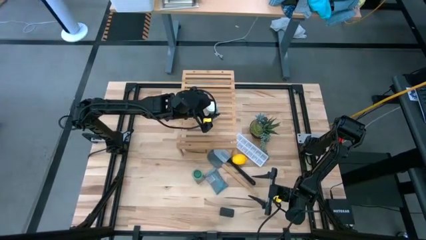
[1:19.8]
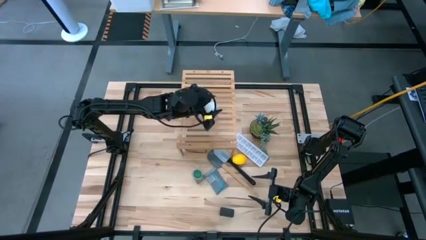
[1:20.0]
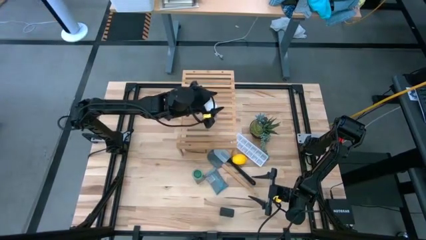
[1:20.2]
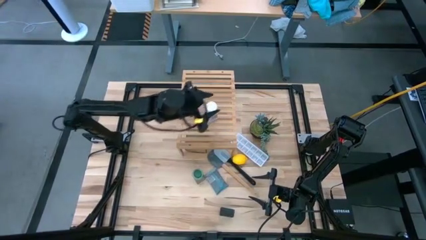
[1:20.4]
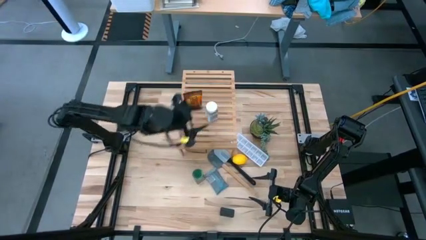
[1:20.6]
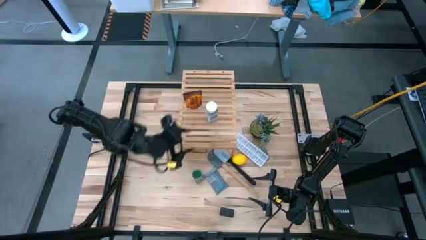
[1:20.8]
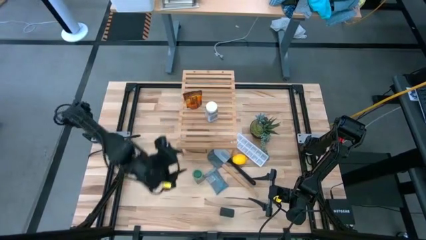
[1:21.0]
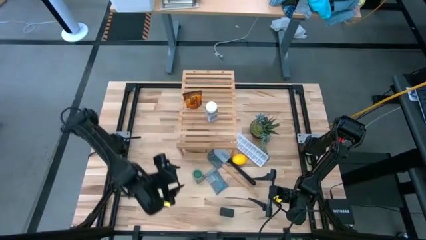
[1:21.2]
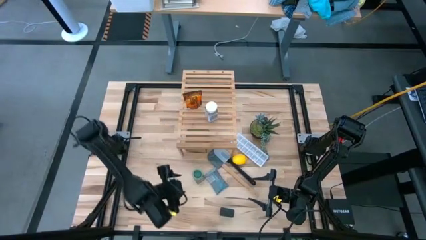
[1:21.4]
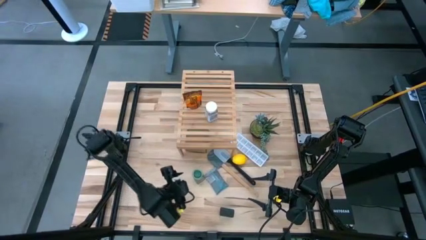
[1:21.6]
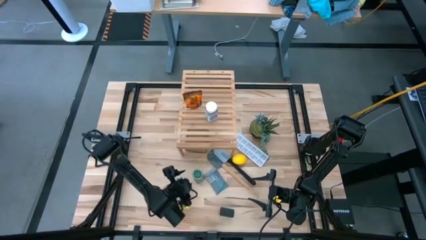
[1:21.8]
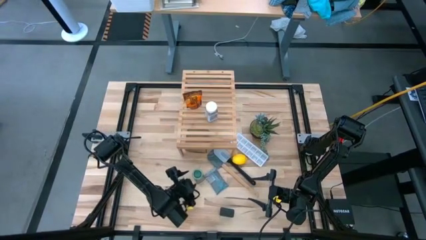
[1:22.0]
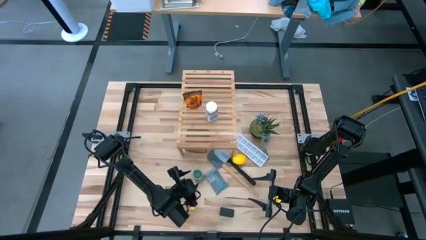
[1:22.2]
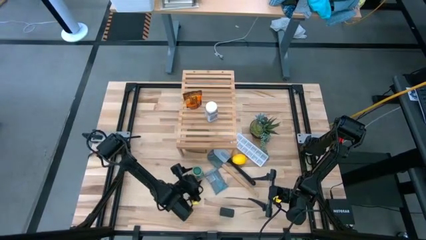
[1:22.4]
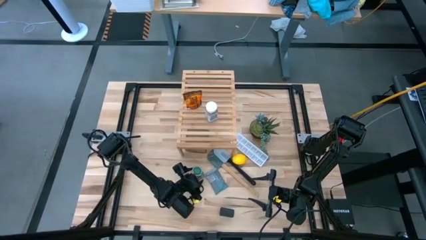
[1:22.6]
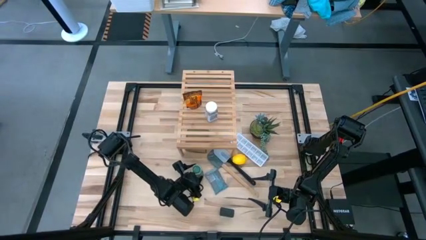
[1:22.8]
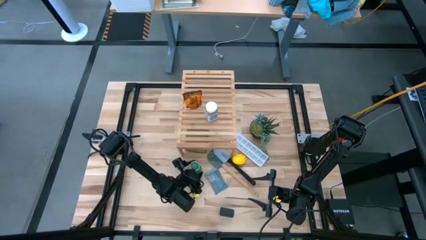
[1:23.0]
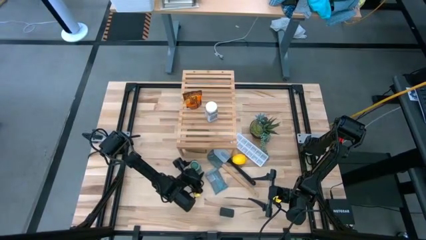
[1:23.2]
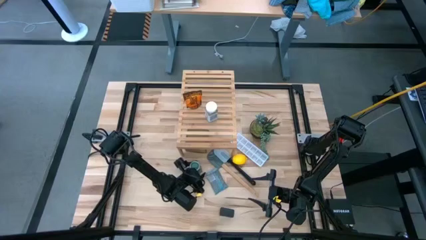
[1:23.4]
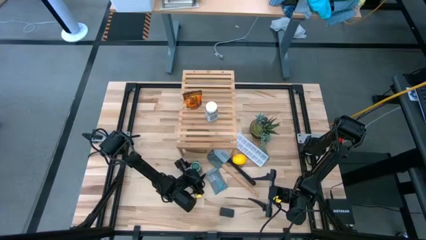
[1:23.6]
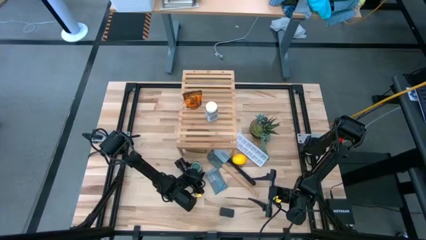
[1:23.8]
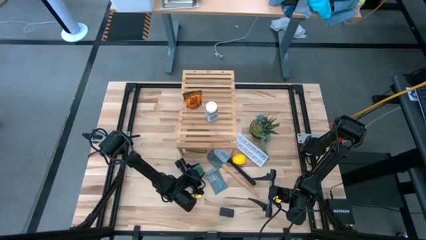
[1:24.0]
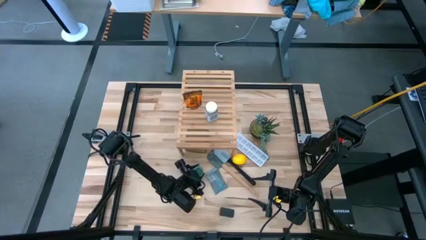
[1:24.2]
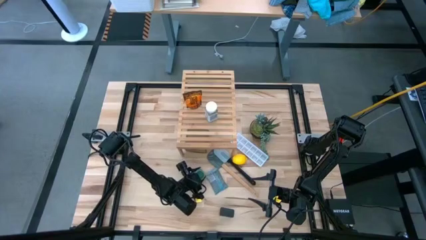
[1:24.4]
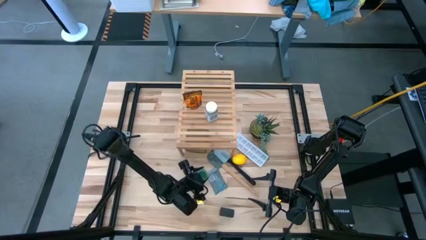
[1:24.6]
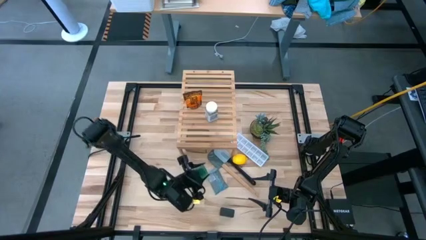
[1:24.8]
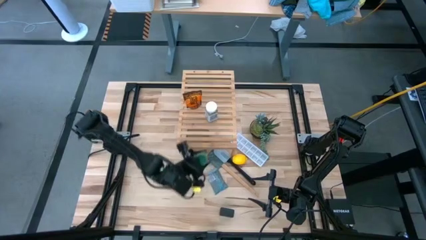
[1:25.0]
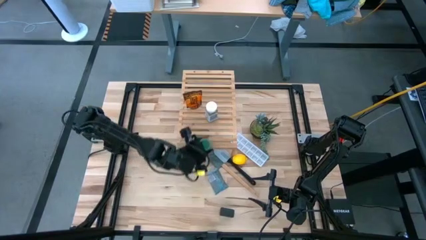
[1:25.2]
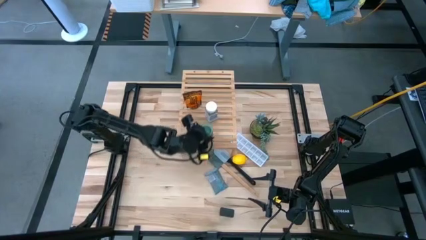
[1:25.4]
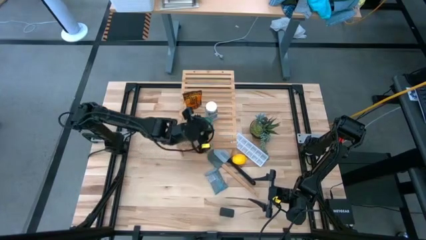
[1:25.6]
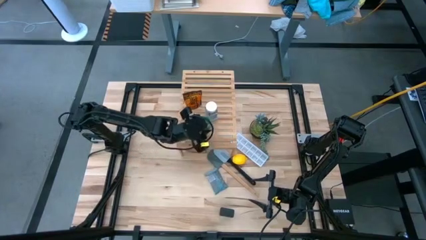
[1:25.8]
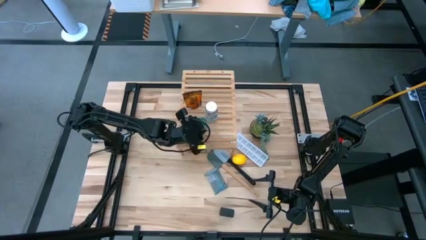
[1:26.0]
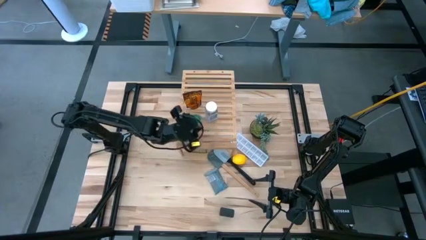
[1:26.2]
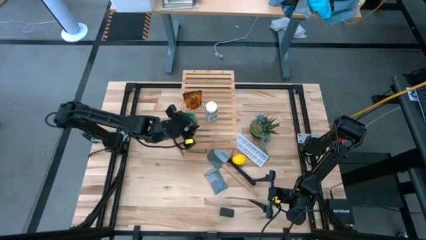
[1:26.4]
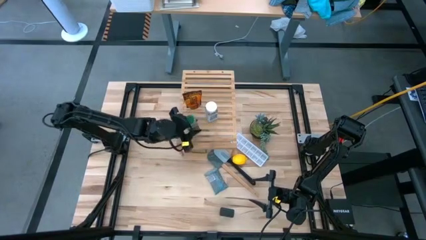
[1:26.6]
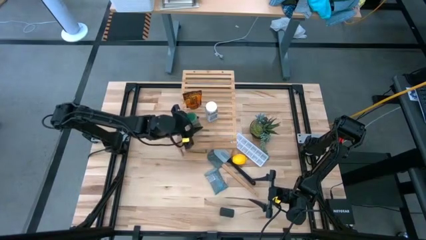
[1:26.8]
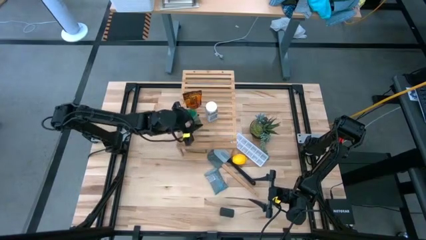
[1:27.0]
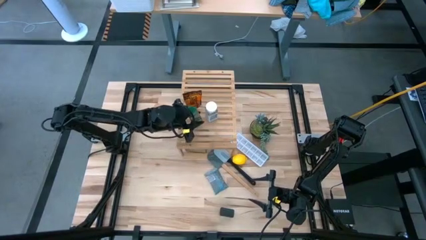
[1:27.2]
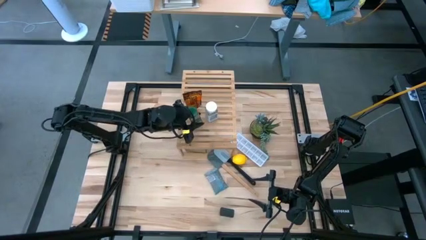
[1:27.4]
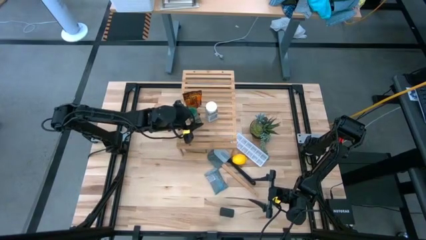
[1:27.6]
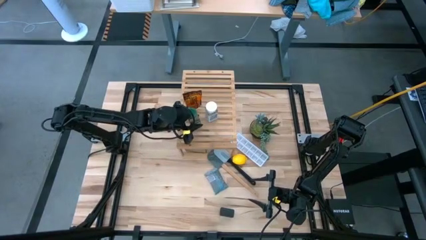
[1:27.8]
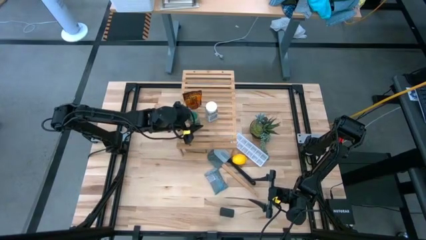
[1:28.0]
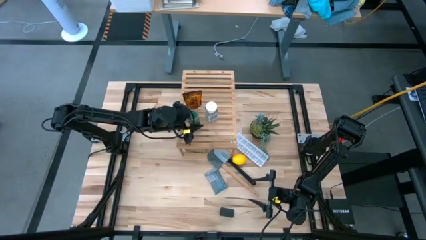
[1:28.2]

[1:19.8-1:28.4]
Task: Shelf spices
Put the green seasoning bottle on the shelf

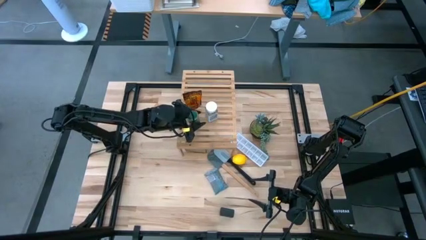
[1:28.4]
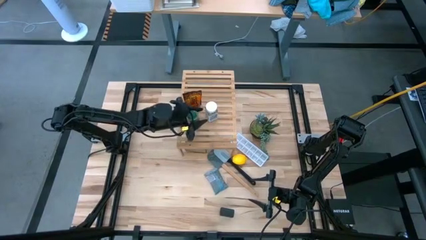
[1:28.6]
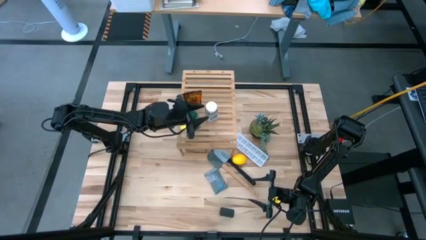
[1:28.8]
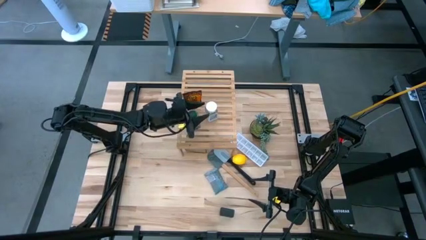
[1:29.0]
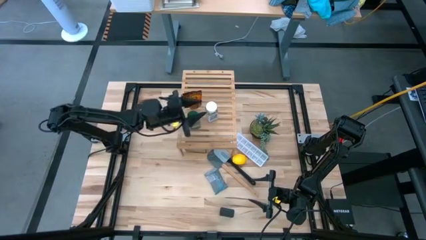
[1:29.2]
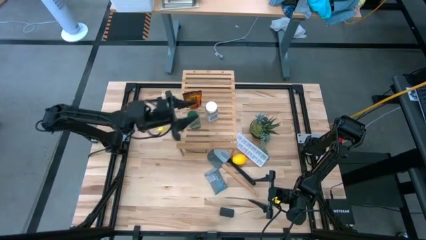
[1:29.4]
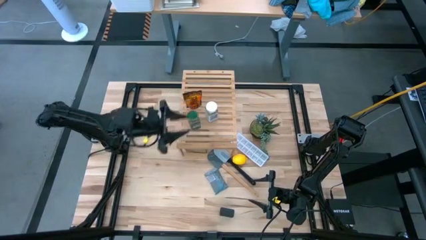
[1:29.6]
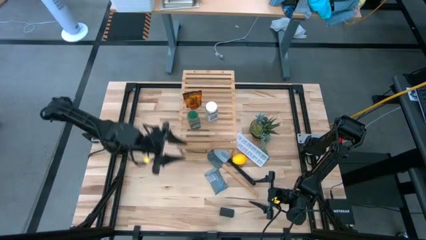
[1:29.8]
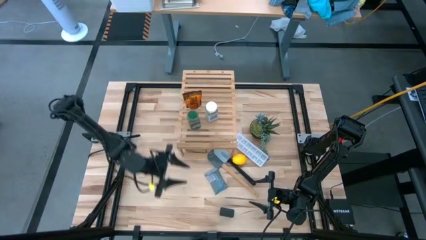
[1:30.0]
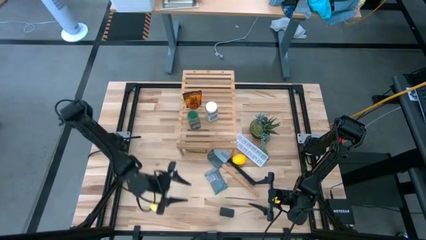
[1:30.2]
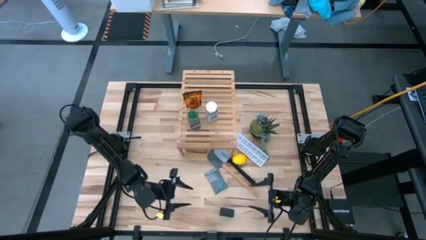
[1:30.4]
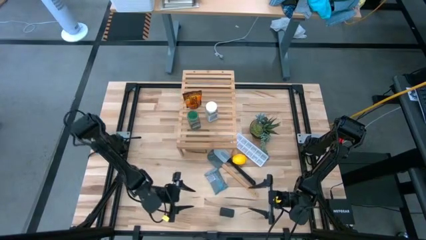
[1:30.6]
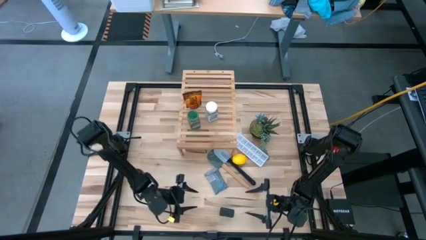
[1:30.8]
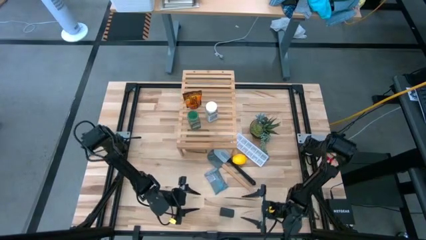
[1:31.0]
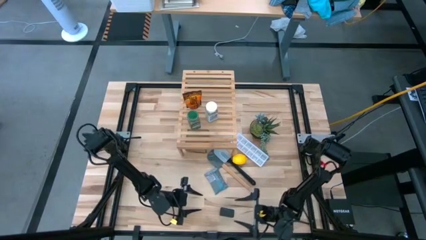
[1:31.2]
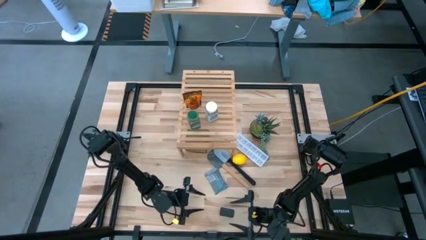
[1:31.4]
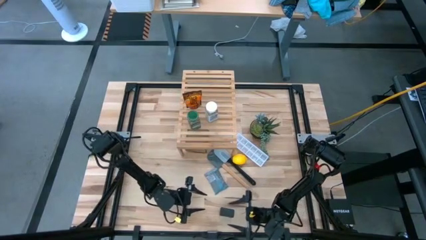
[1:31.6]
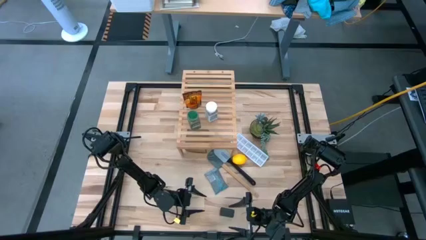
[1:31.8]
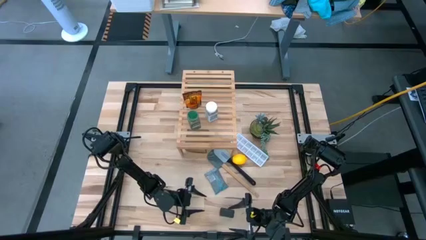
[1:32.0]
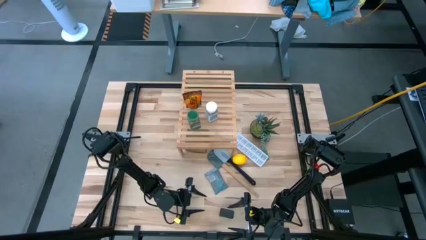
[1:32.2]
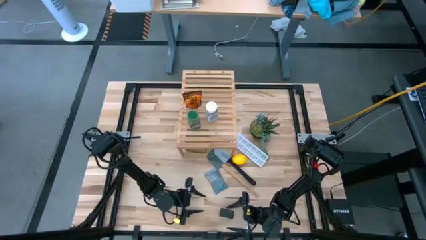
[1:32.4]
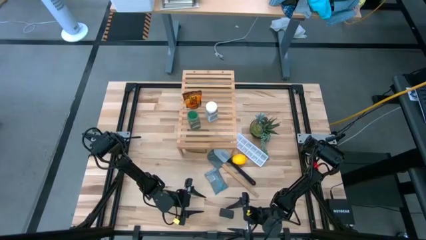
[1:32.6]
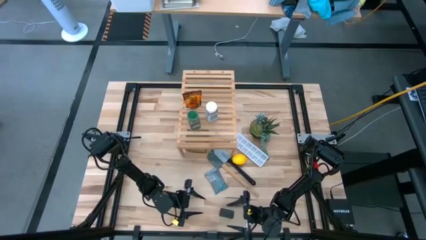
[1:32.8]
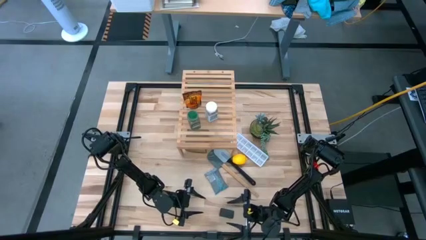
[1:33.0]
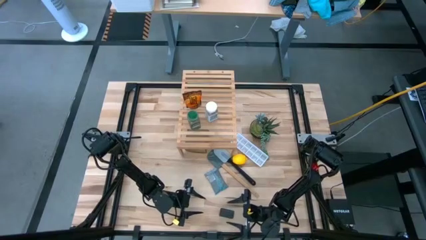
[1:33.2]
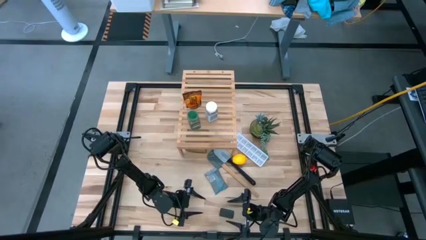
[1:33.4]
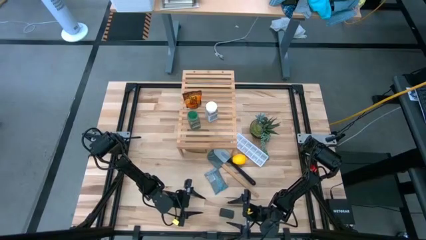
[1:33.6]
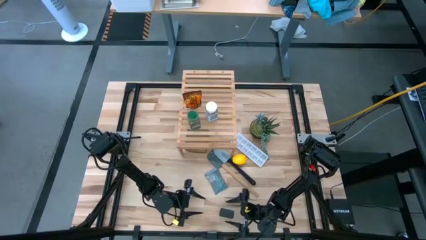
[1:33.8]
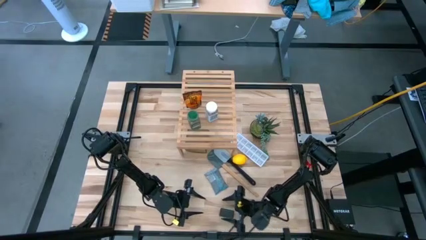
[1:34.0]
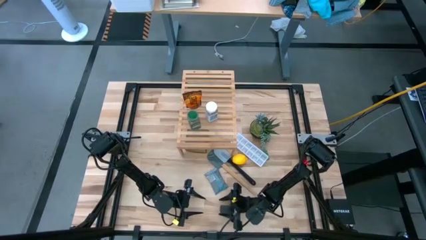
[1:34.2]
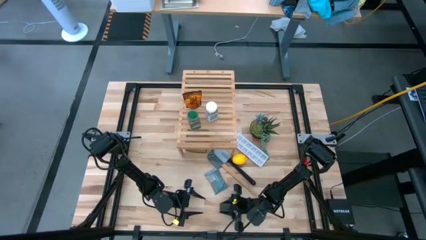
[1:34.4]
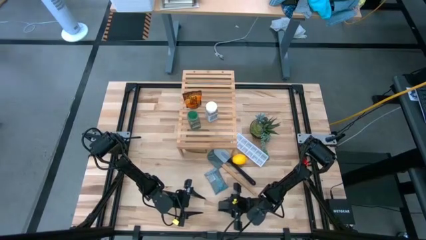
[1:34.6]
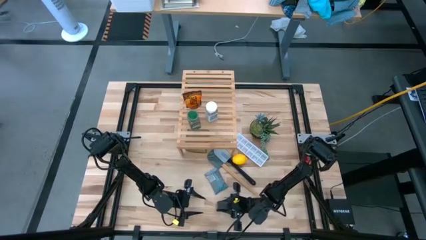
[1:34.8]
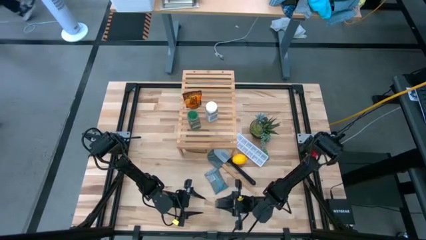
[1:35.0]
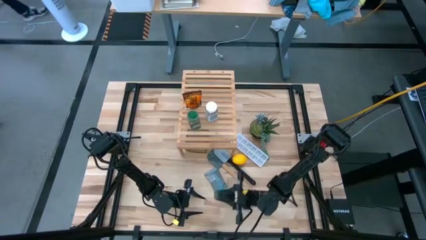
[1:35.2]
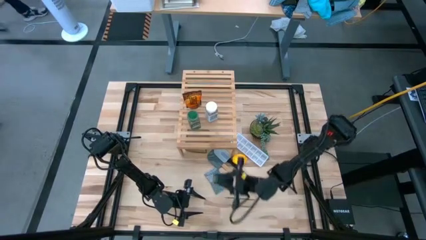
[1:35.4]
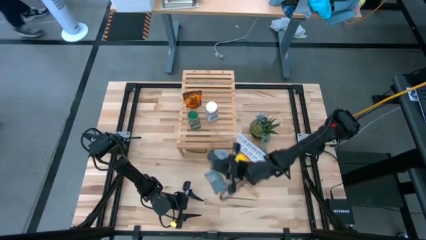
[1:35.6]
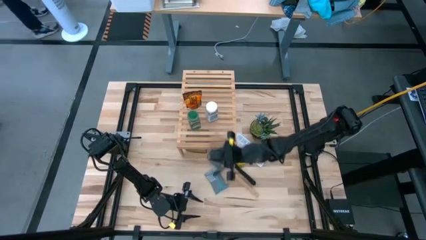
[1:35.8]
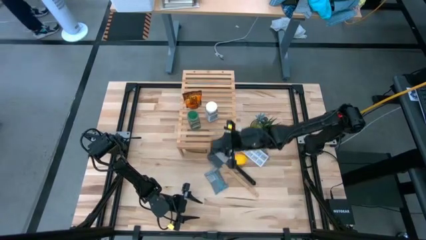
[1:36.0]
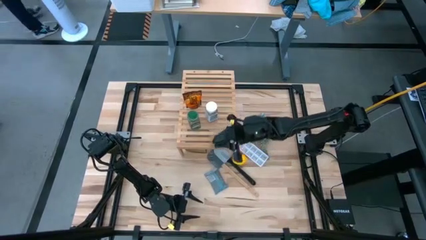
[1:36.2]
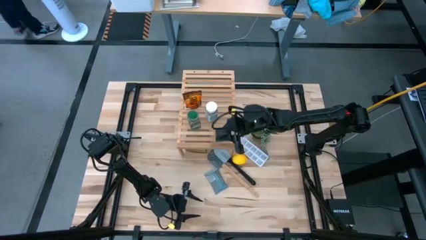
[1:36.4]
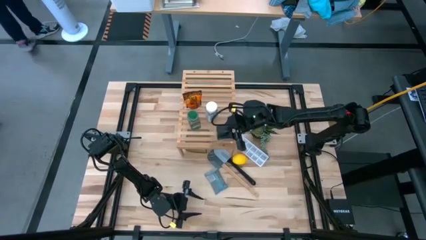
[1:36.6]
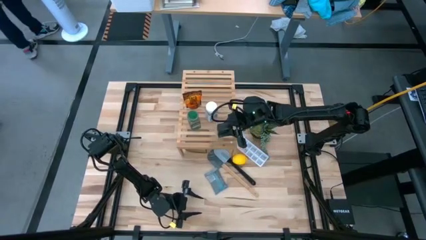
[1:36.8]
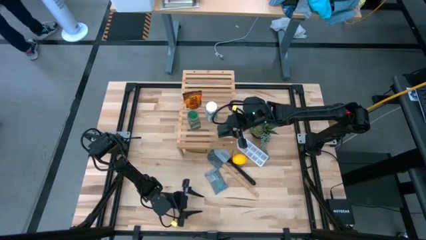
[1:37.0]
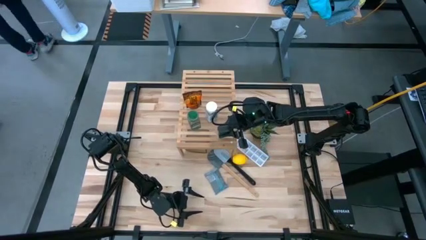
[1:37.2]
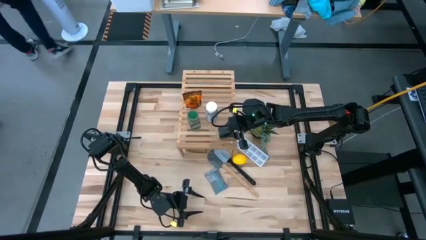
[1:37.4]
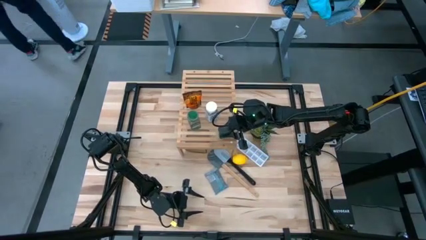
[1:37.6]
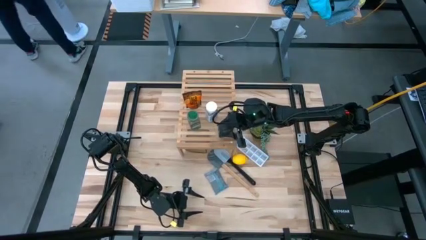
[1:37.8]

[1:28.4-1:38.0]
Put the black and green seasoning bottle on the shelf
